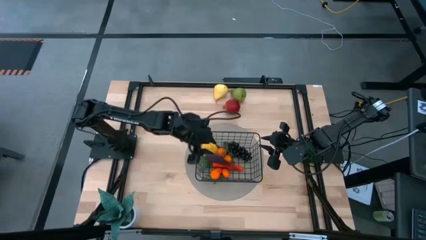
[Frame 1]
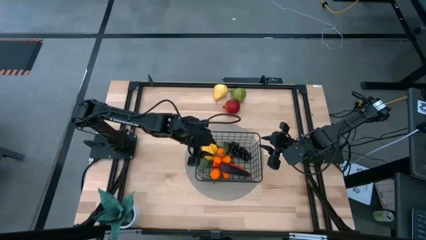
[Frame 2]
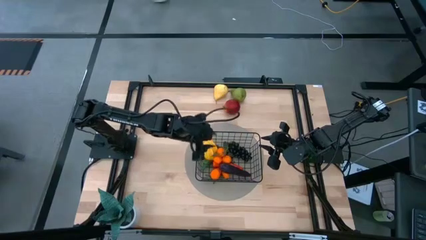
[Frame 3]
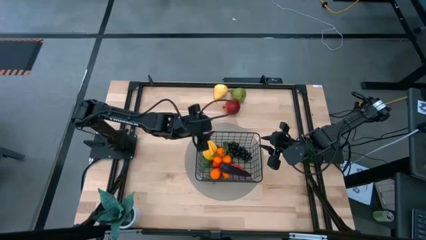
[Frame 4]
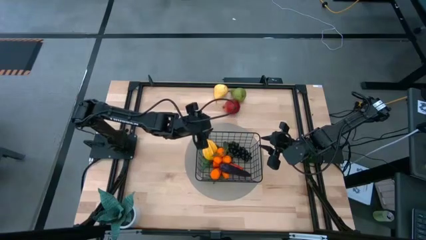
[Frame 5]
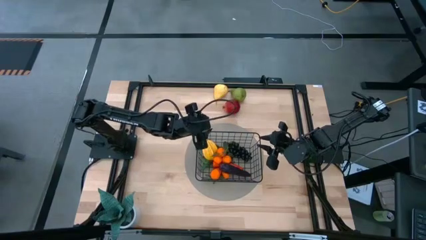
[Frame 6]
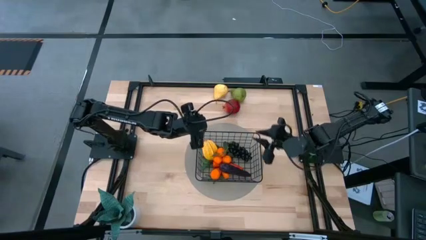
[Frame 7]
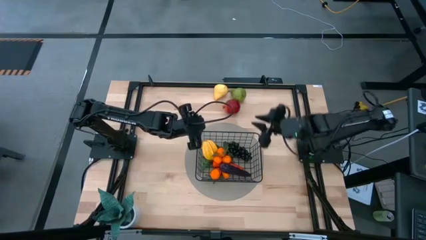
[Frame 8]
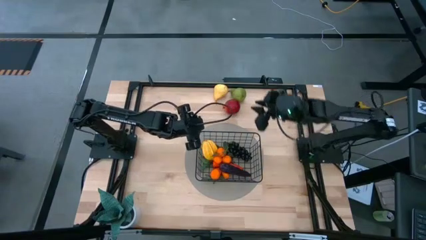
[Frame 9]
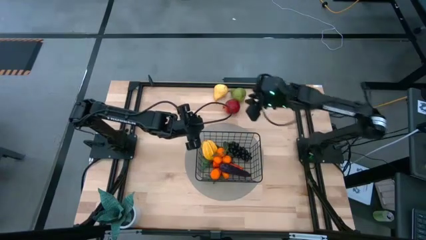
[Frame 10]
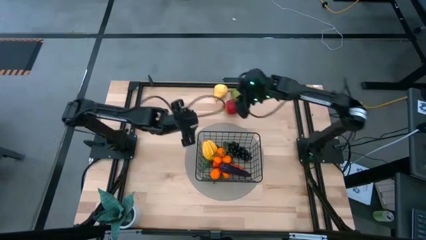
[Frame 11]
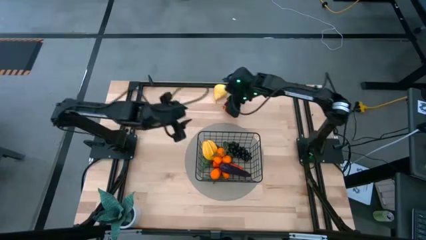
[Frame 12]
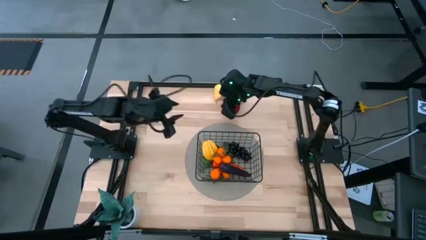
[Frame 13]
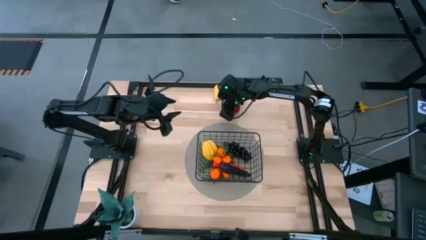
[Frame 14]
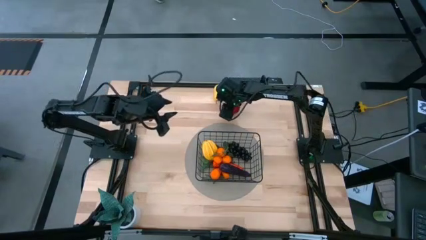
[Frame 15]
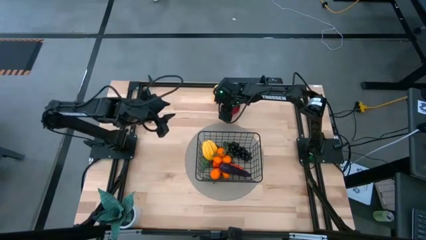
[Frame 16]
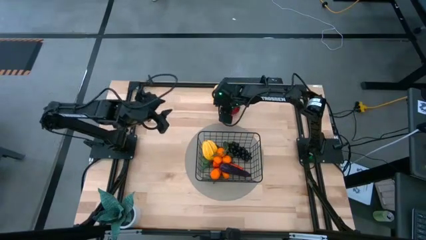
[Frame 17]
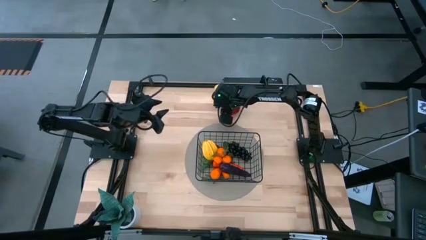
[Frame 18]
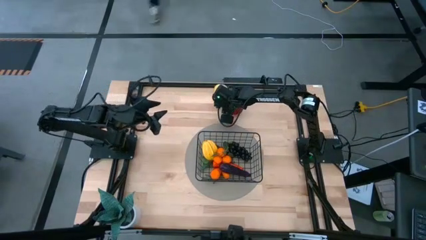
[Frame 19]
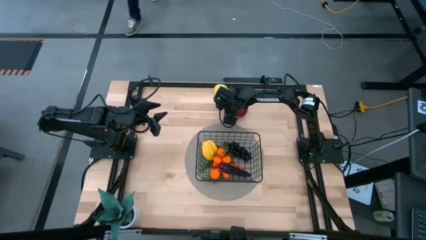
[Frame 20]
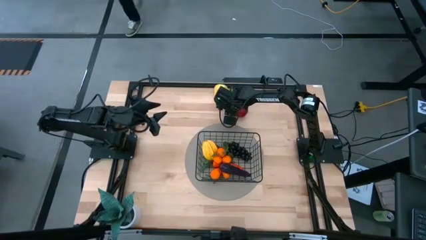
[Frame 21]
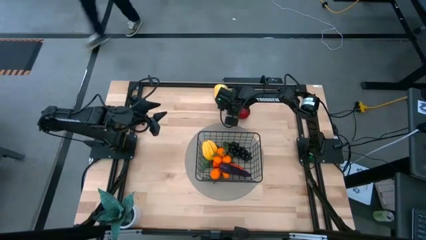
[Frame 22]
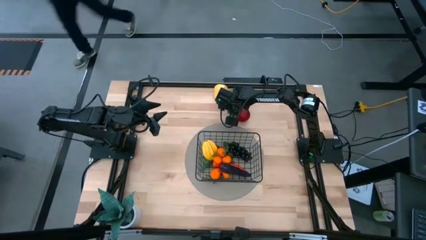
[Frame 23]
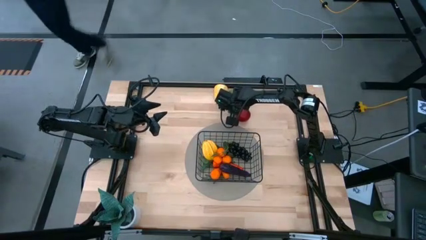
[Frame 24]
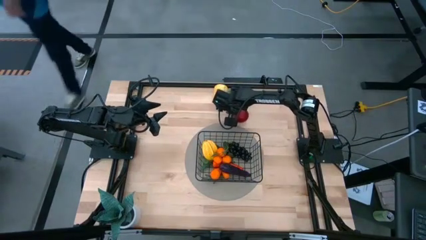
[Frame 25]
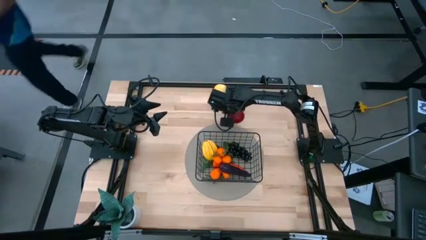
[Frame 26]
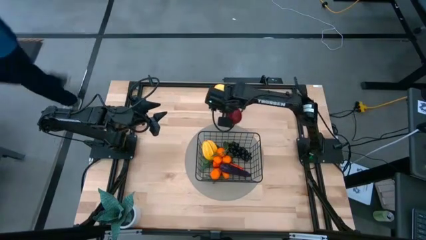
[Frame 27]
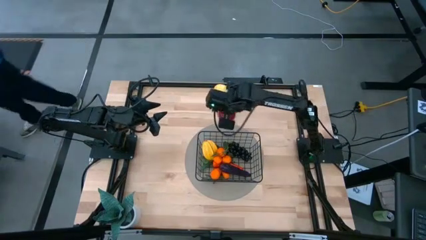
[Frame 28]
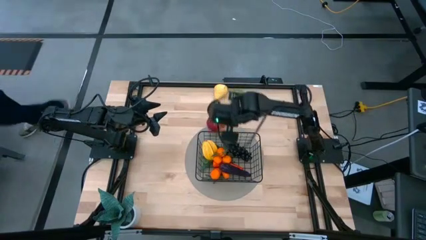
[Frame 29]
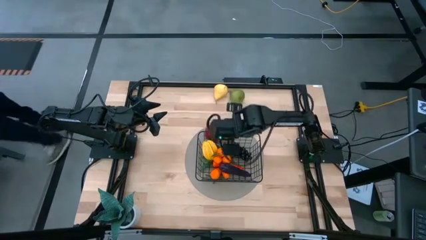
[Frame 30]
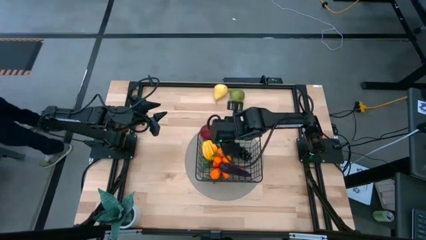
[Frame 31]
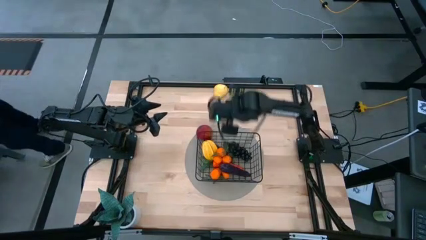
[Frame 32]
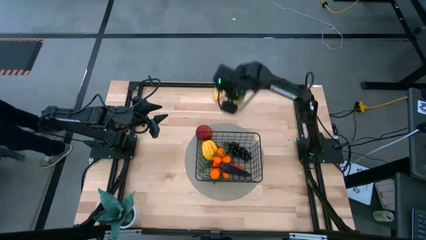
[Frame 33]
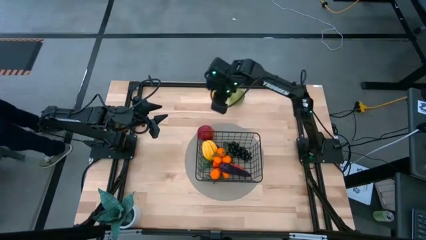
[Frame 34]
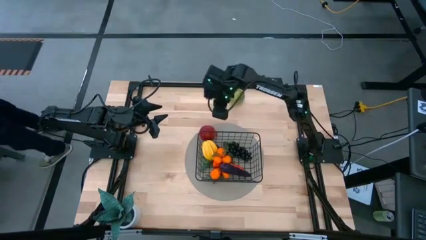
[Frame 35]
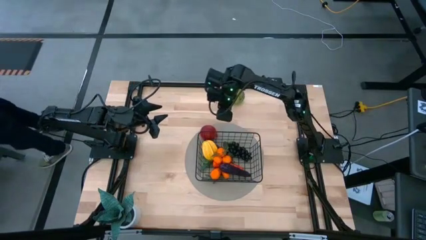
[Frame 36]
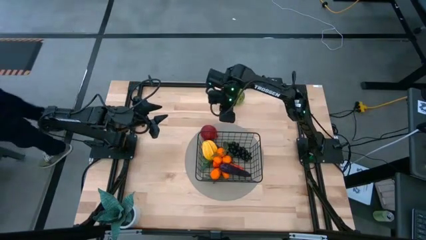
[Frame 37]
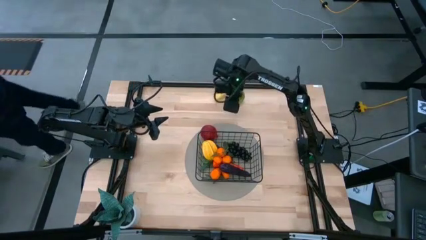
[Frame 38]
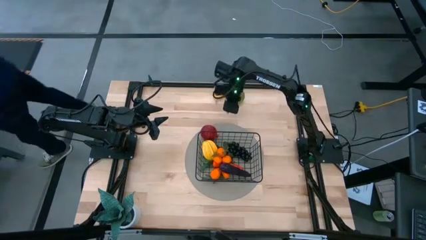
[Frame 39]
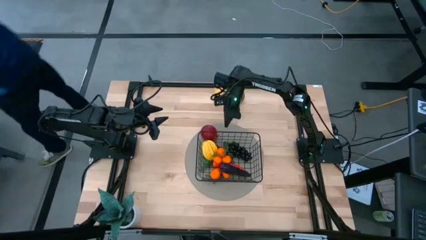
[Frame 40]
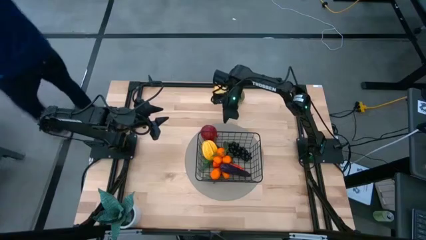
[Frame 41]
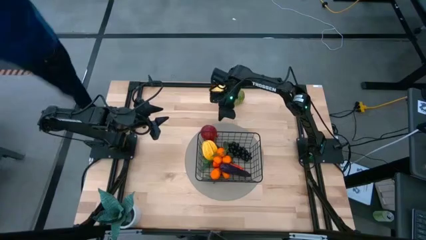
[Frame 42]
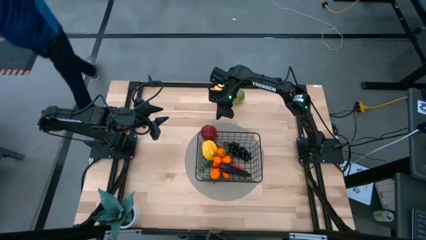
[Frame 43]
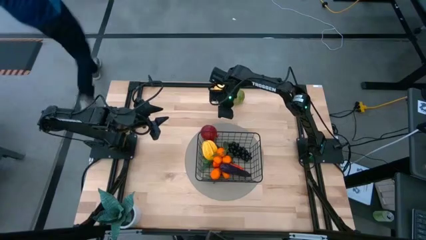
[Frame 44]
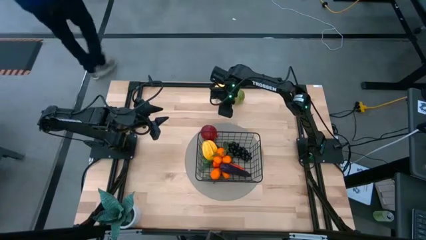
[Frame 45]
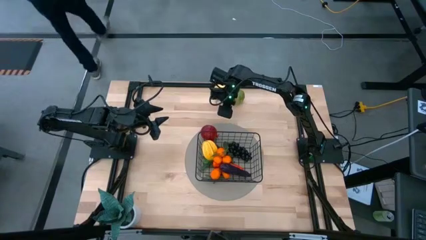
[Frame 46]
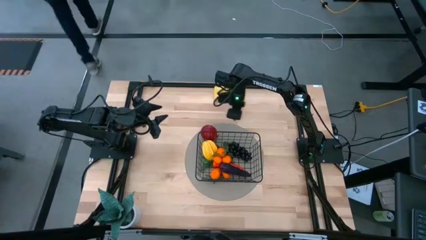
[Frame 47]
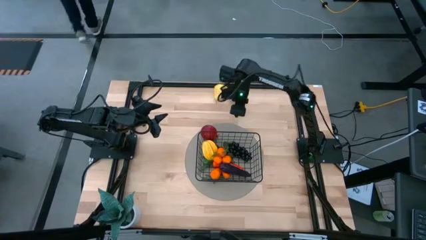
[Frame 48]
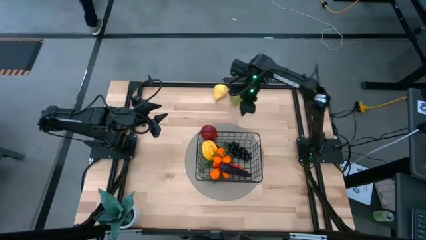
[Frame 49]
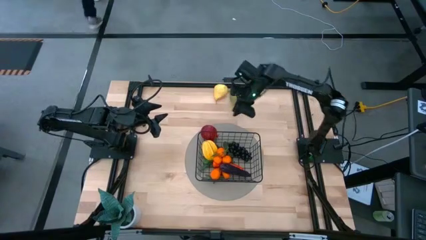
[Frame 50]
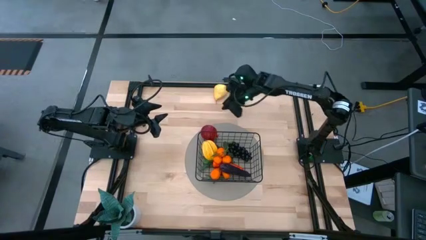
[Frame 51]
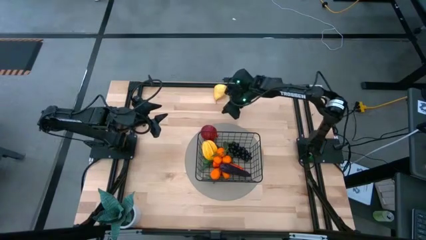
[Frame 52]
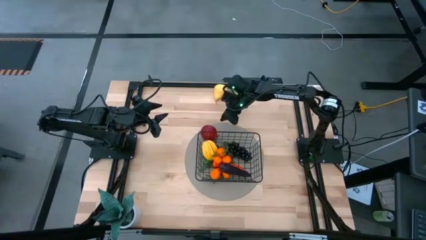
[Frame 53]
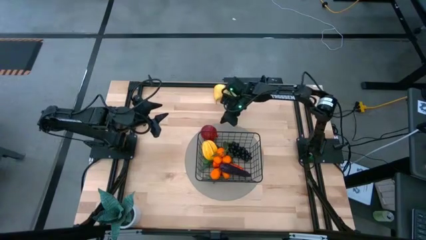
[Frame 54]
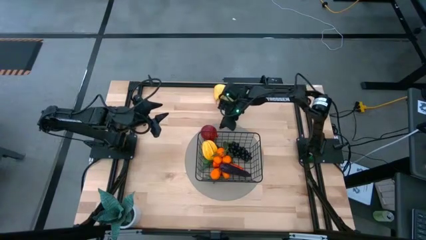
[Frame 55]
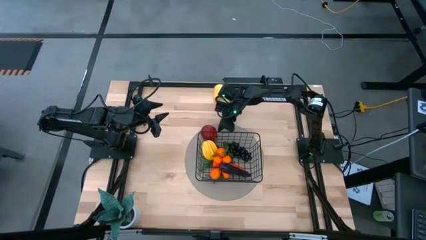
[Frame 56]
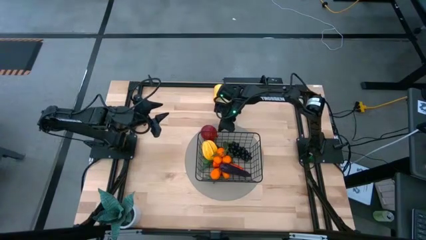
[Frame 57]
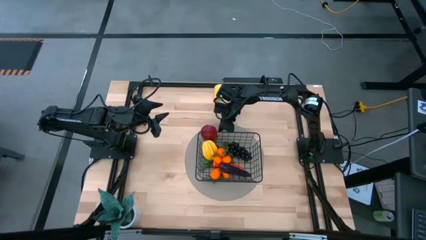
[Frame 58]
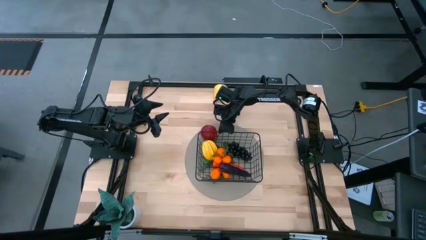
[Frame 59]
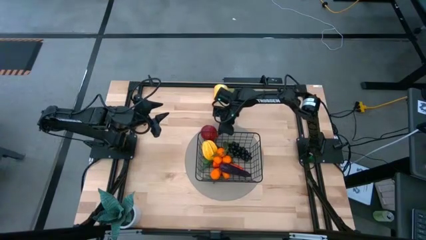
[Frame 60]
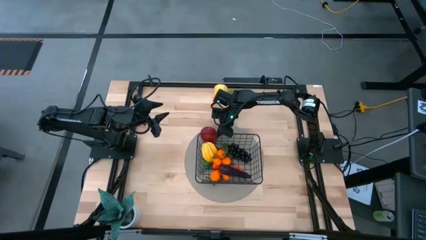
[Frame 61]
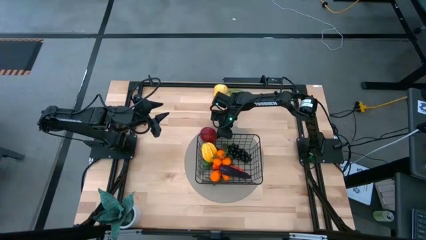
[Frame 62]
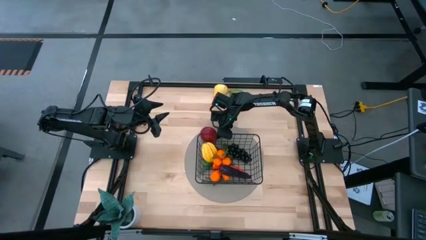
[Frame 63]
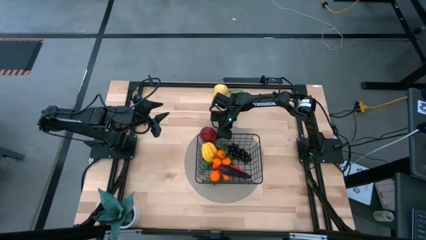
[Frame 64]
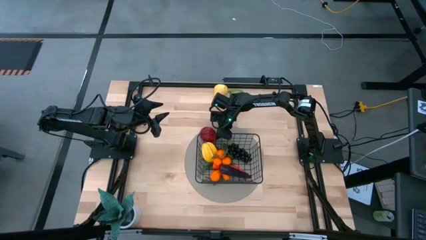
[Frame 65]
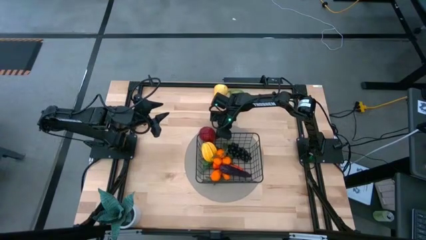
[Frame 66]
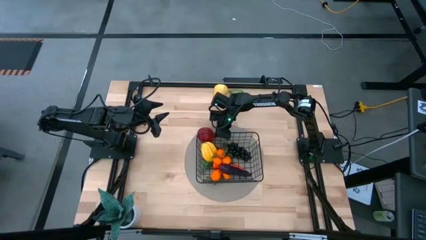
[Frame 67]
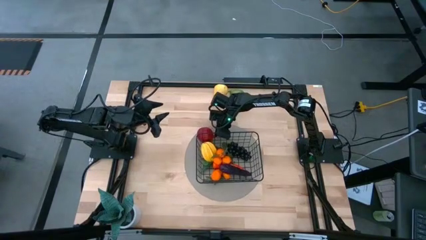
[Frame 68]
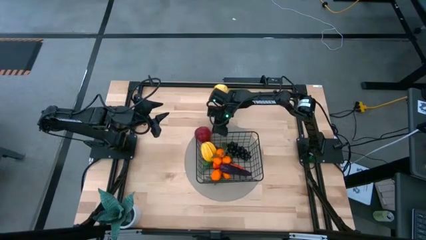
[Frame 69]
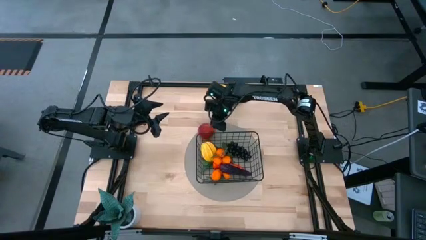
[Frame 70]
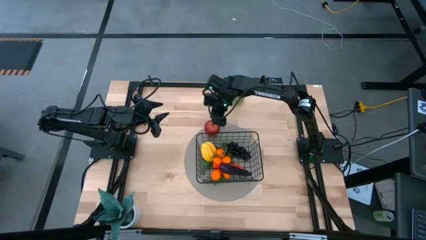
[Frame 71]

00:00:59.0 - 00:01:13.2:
Task: Build produce basket
Put the pomegranate into the wire basket

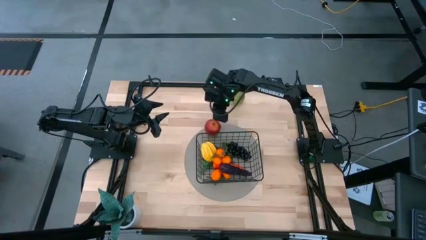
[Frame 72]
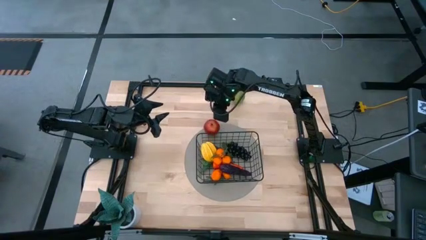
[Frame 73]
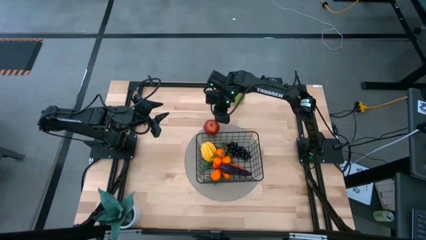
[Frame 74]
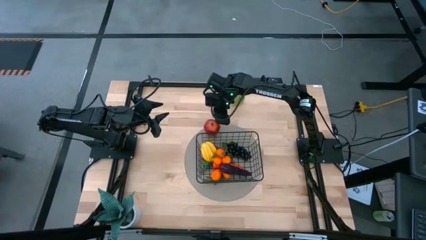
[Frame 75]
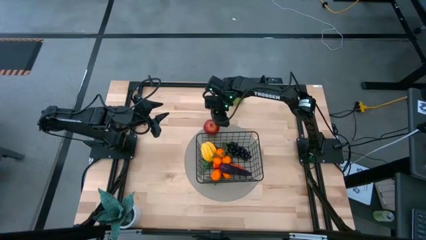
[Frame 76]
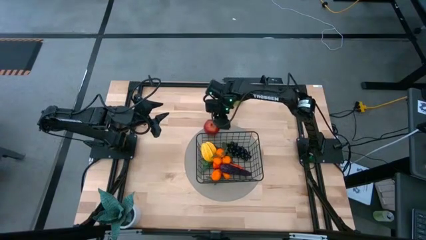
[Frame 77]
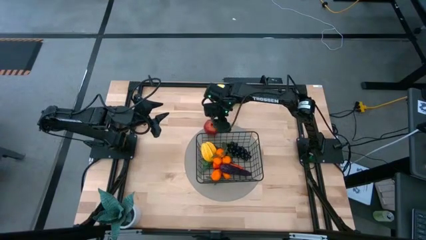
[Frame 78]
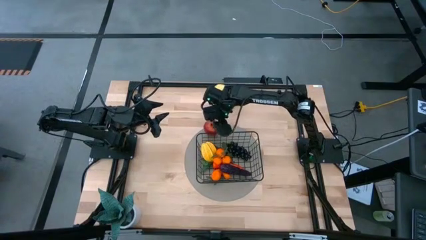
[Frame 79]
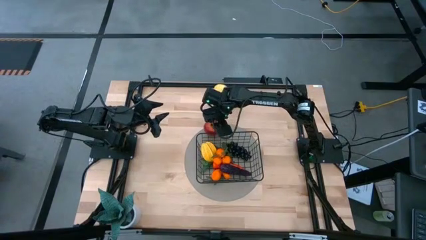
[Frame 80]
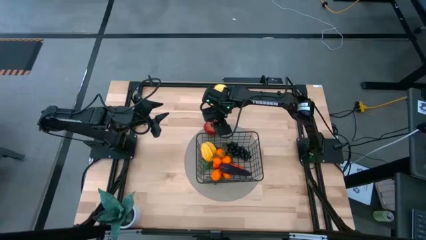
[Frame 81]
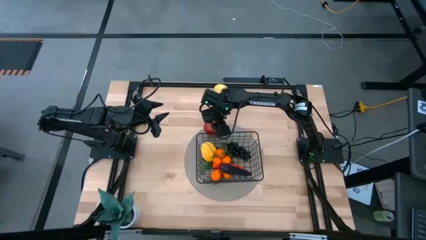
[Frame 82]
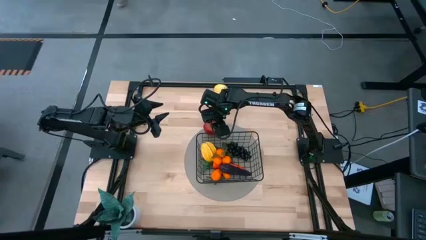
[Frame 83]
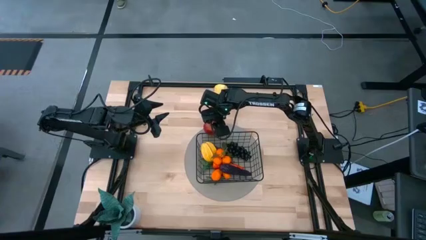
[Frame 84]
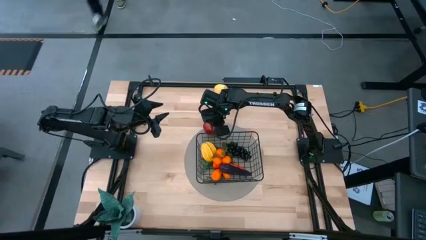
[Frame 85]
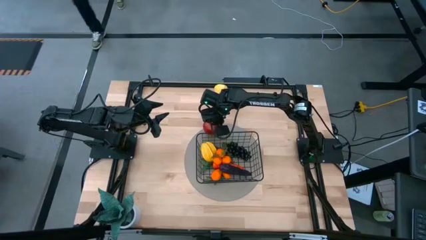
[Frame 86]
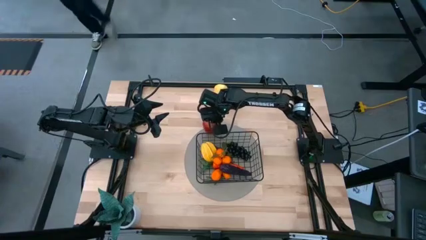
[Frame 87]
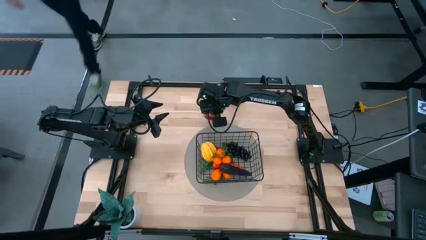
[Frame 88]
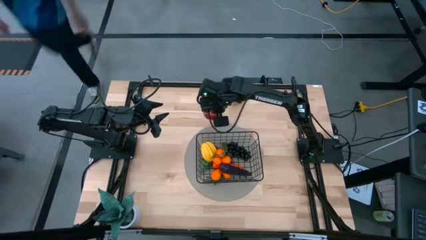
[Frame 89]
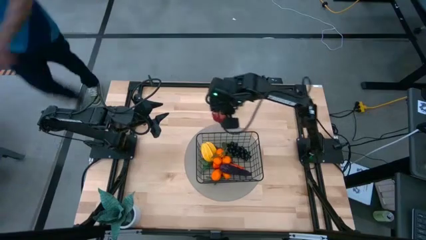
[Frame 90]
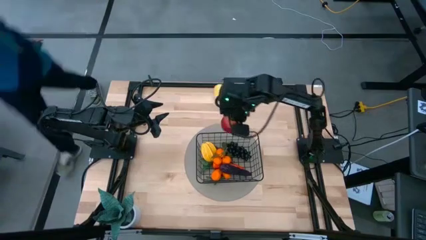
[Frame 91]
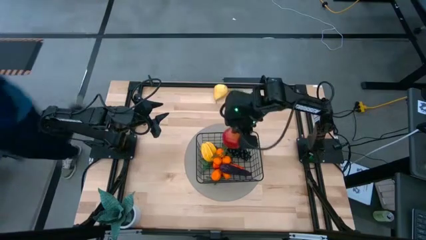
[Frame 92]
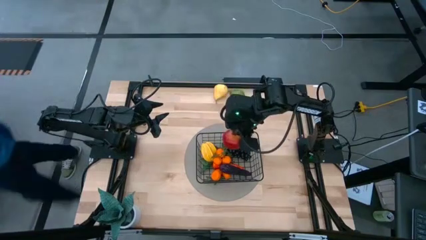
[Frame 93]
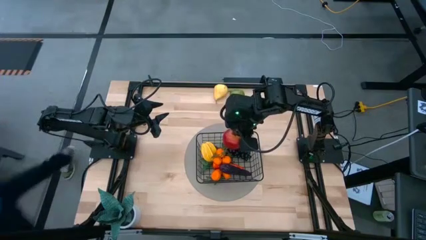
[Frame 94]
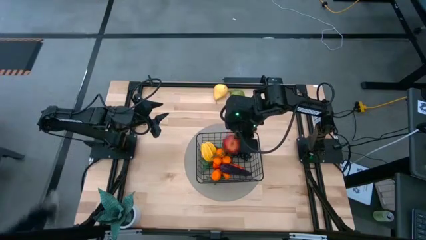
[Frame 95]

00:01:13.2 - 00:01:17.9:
Put the pomegranate into the wire basket
